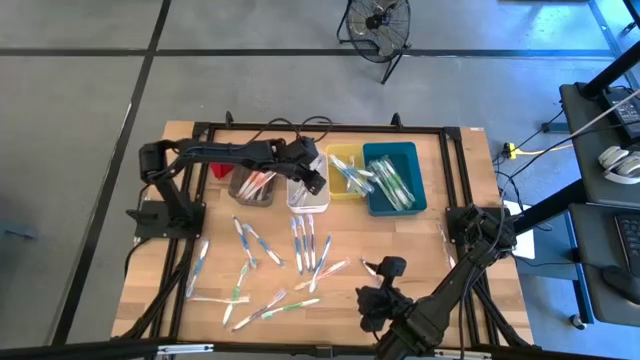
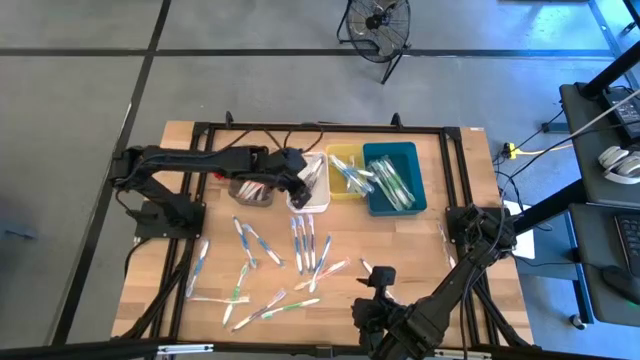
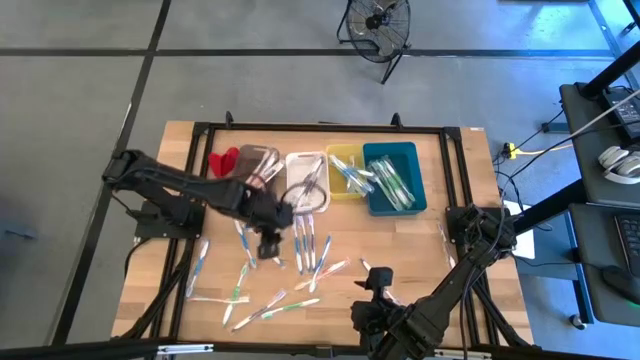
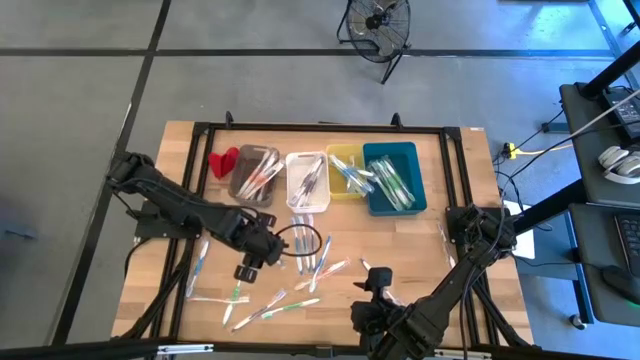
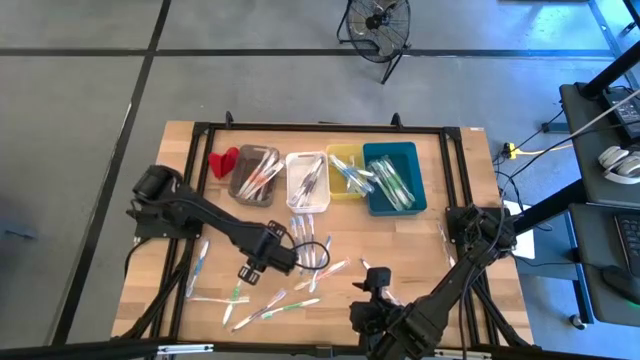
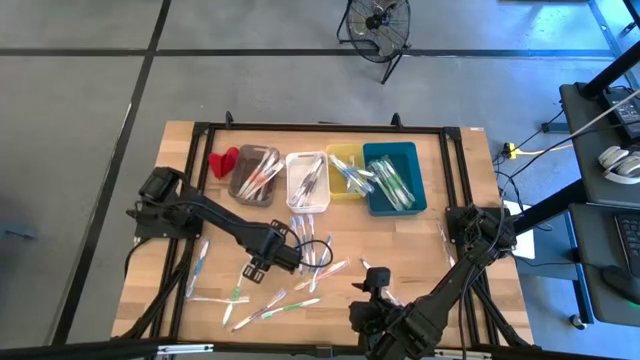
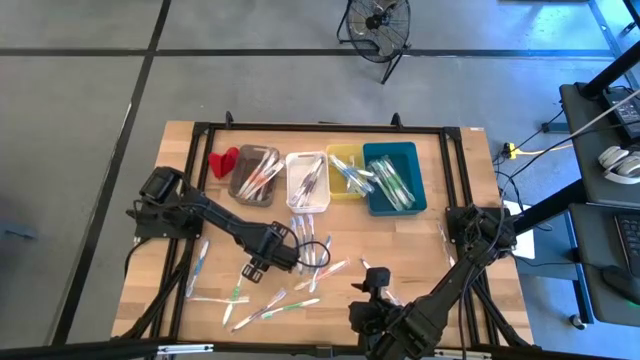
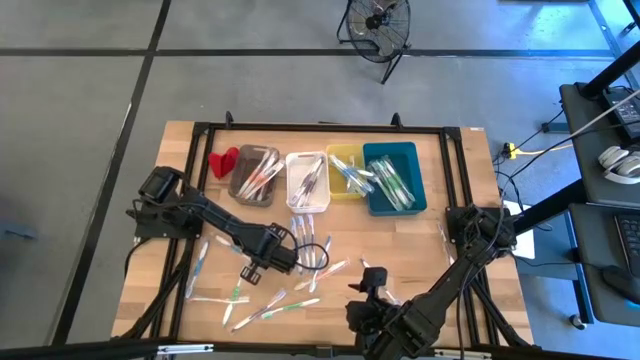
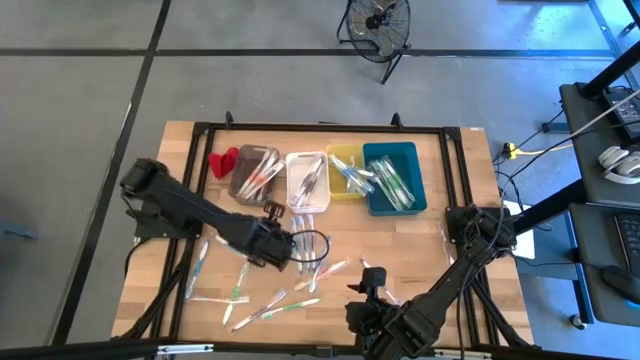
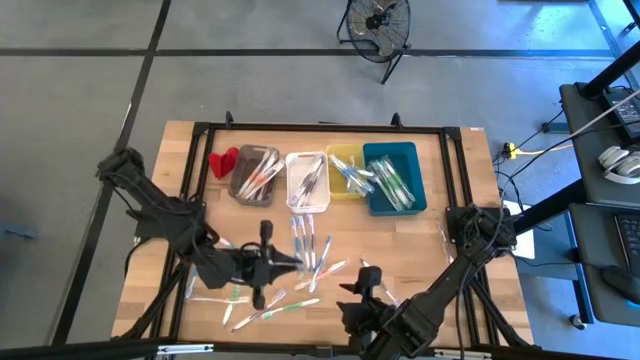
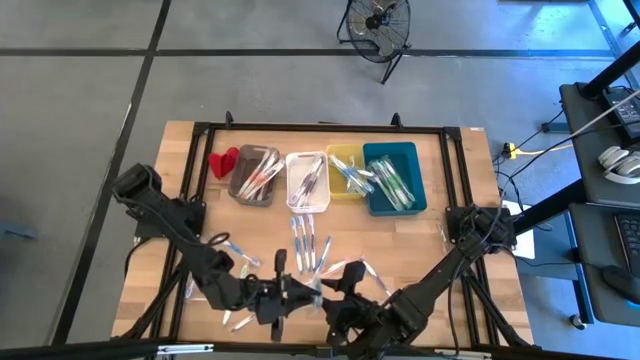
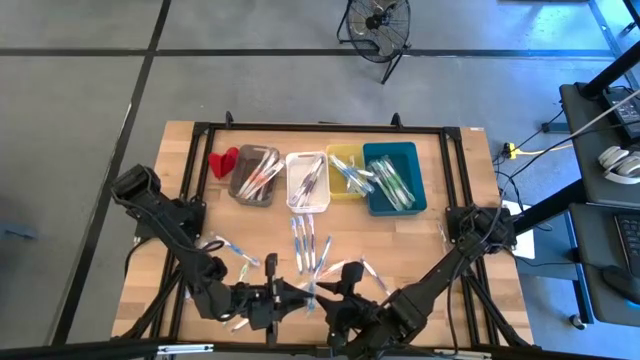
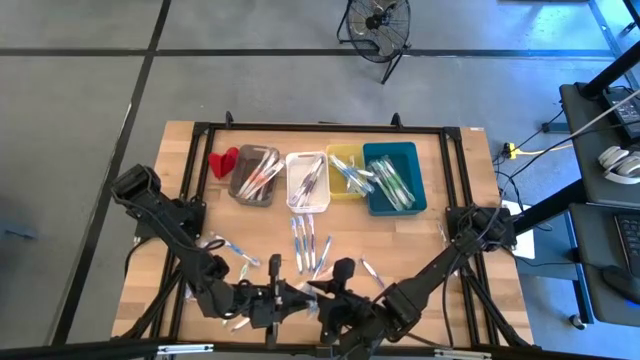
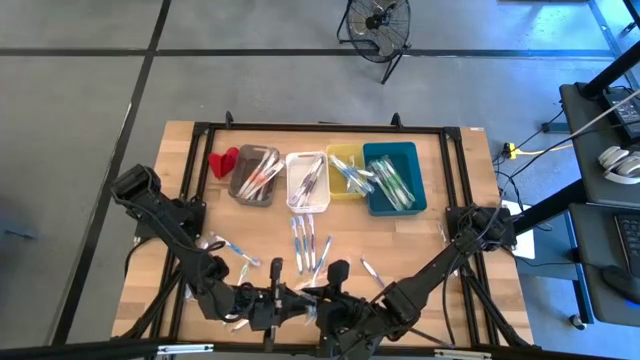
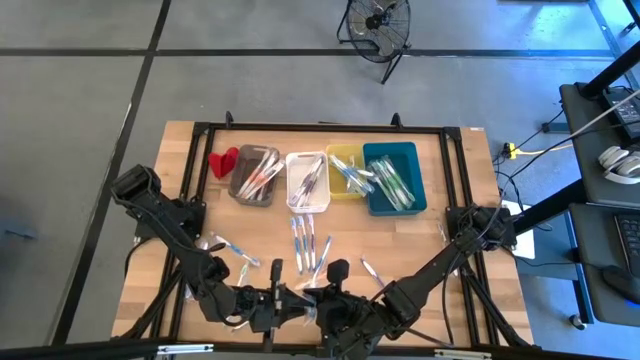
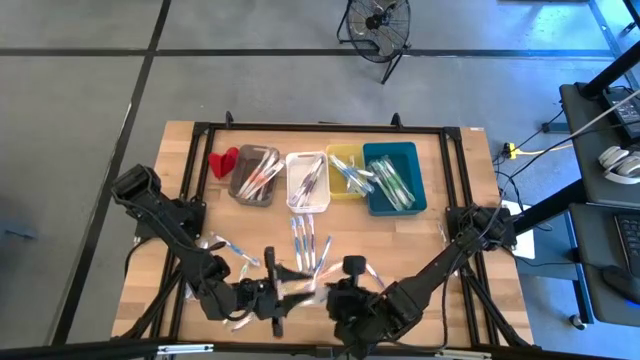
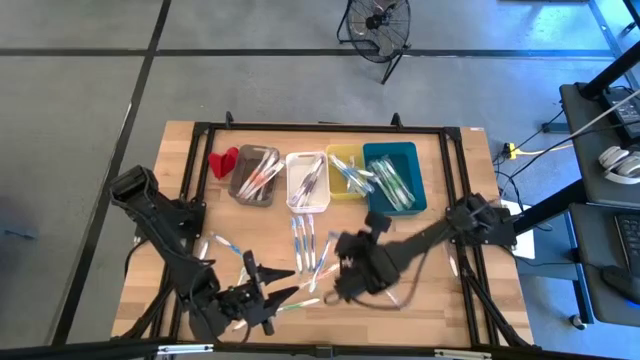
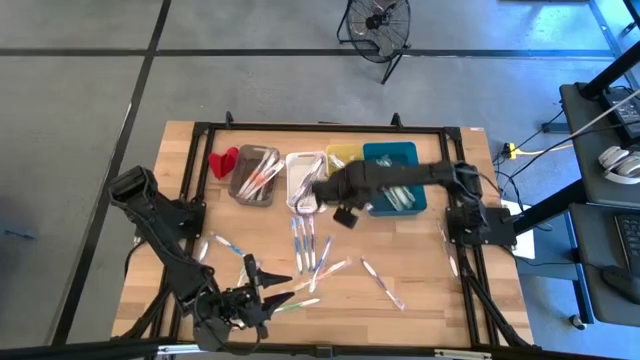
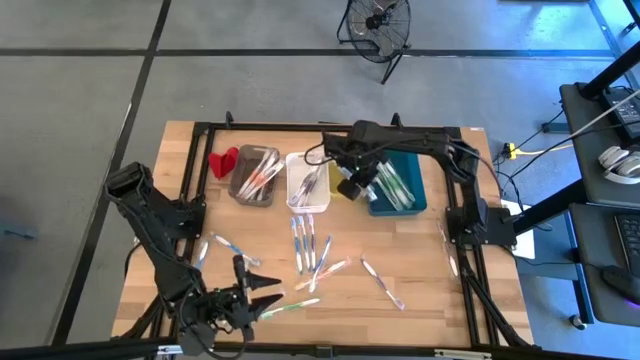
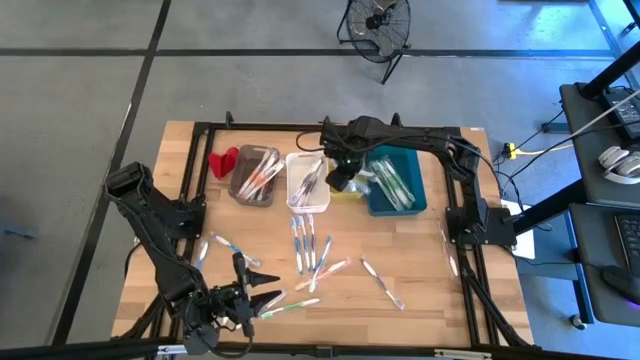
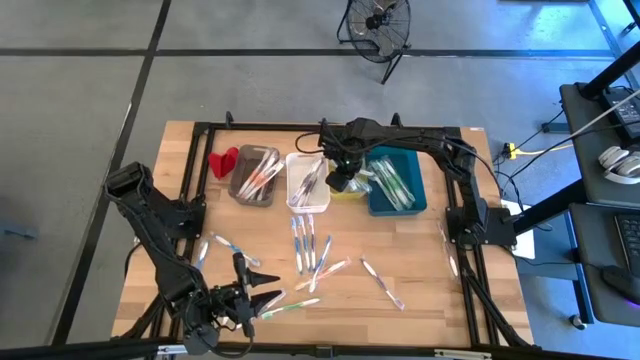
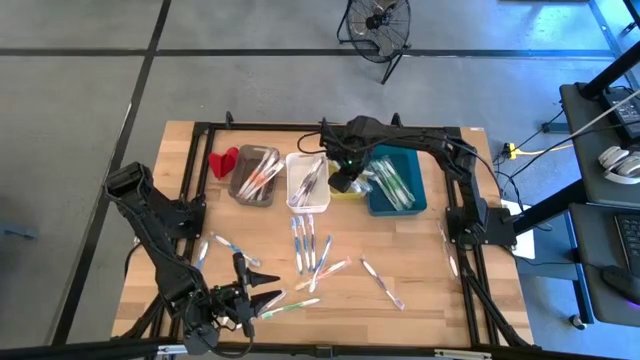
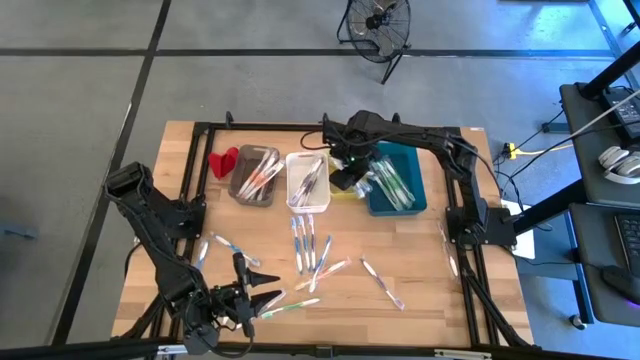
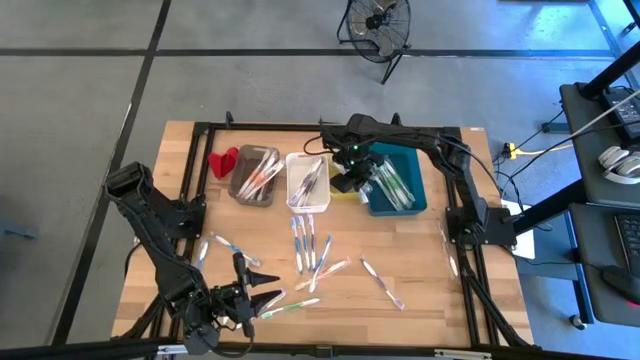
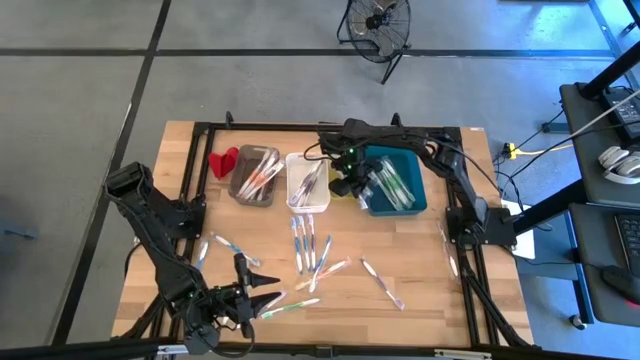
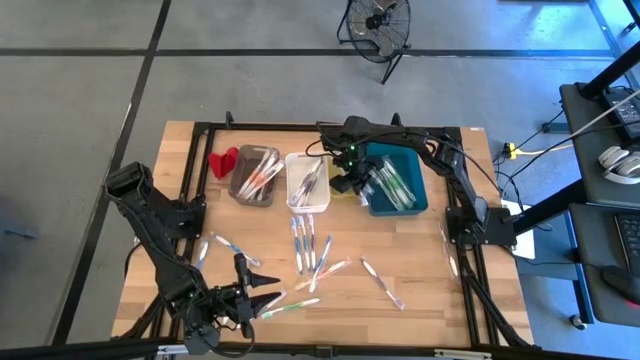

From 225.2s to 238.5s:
Task: Pick & Place Toothbrushes
Put the blue toothbrush into the yellow bin

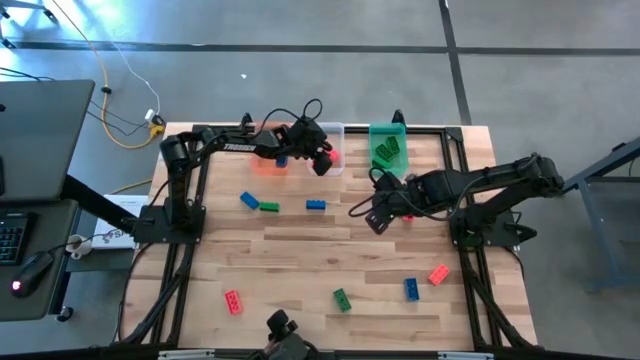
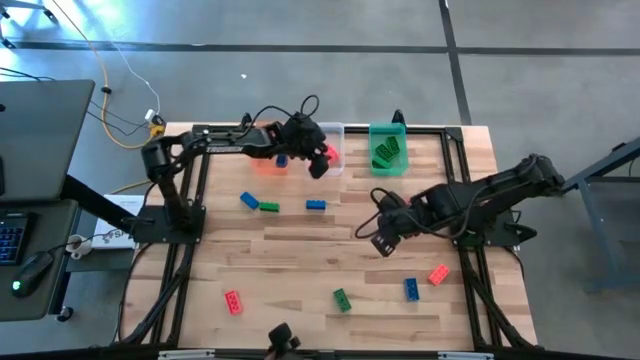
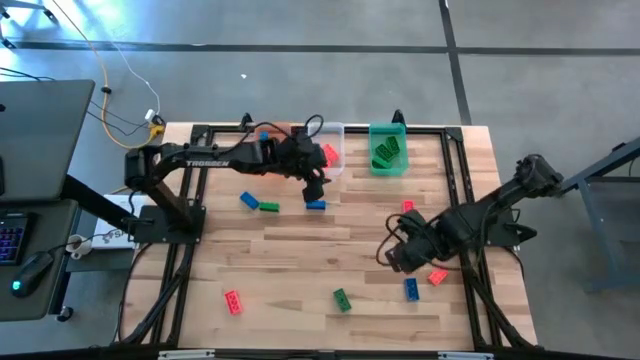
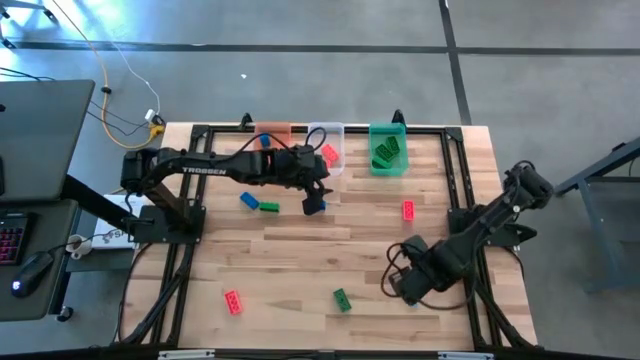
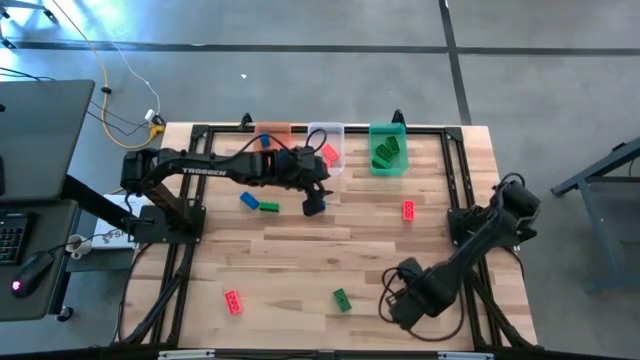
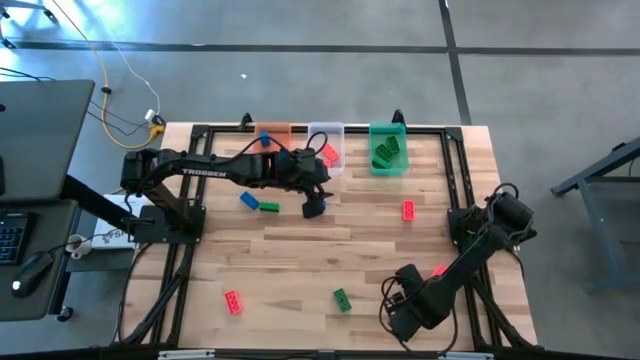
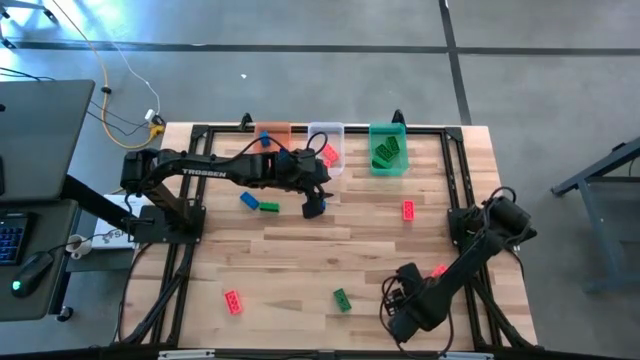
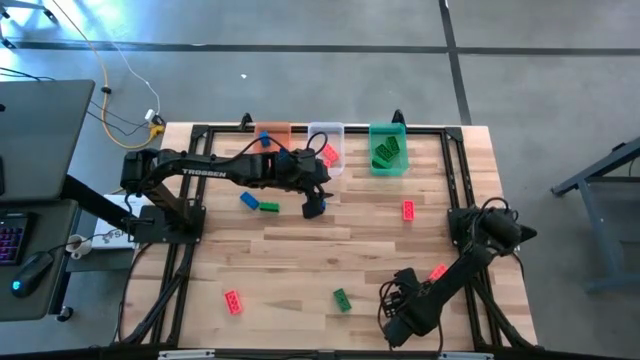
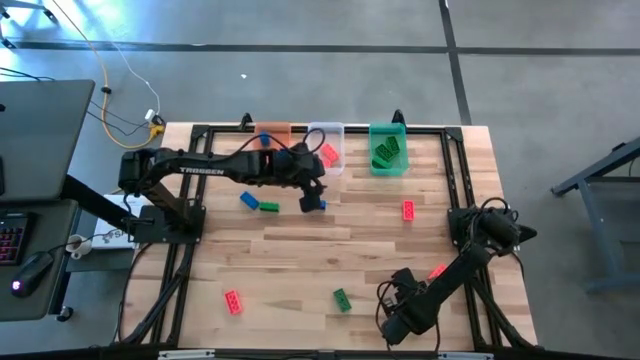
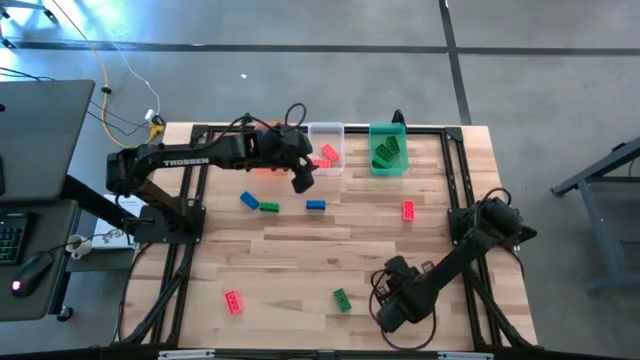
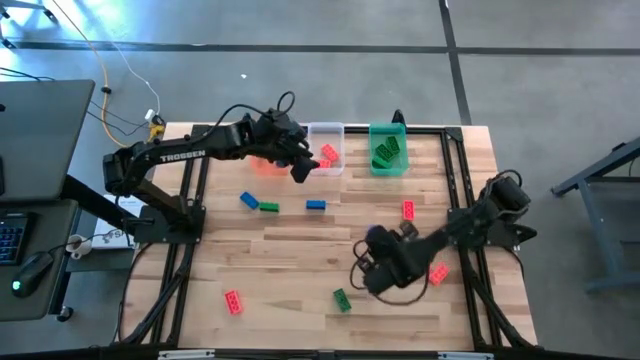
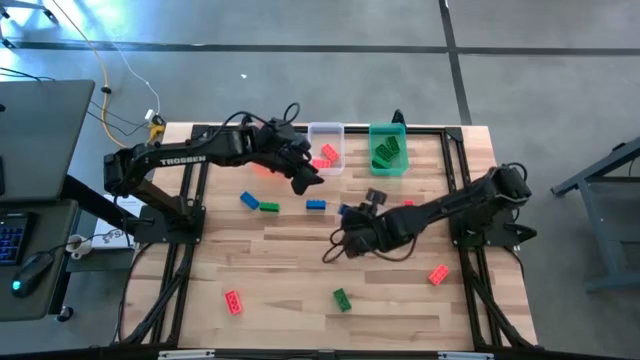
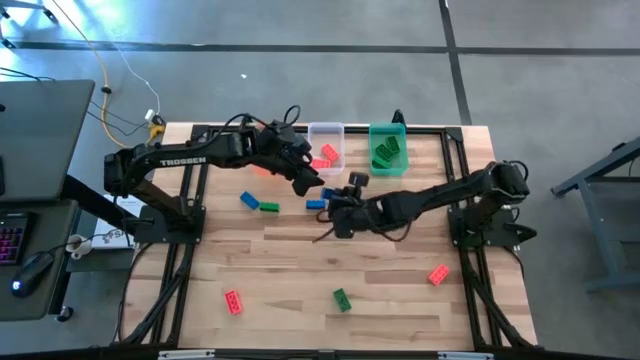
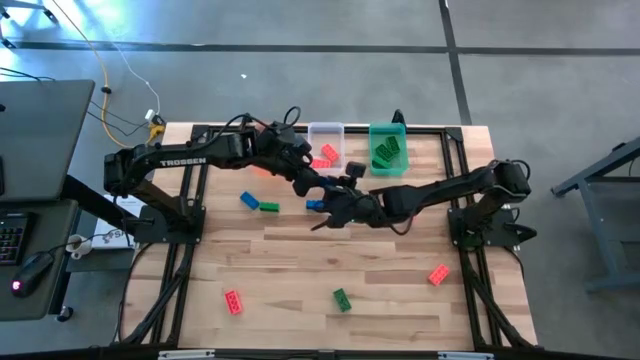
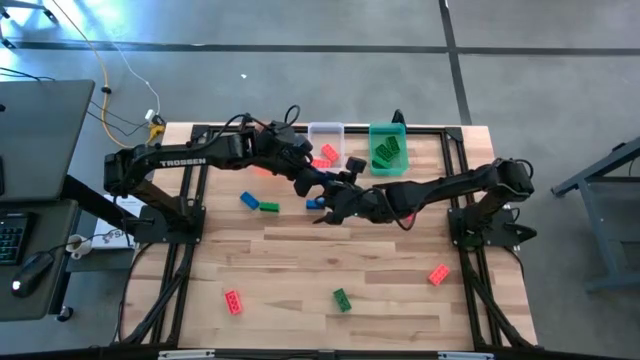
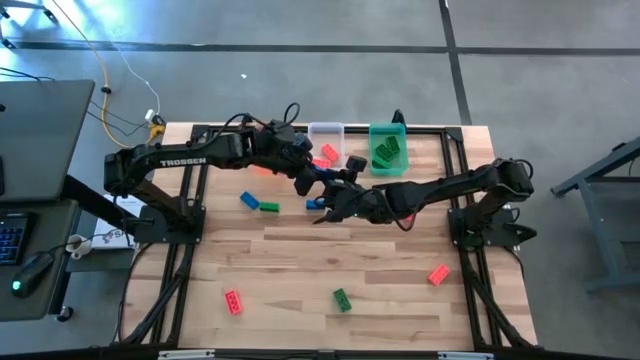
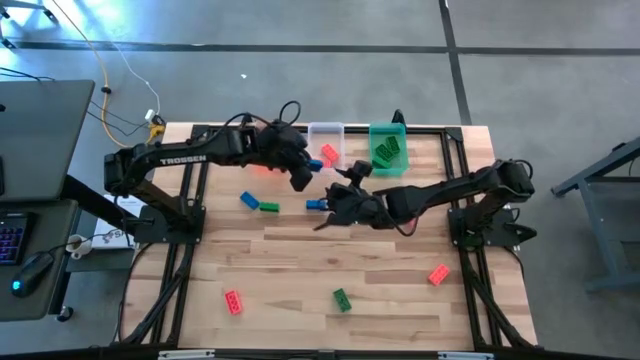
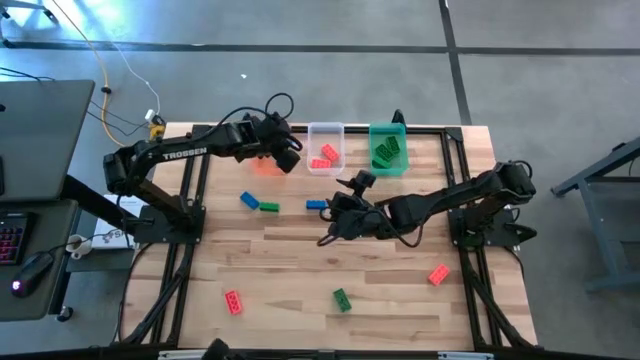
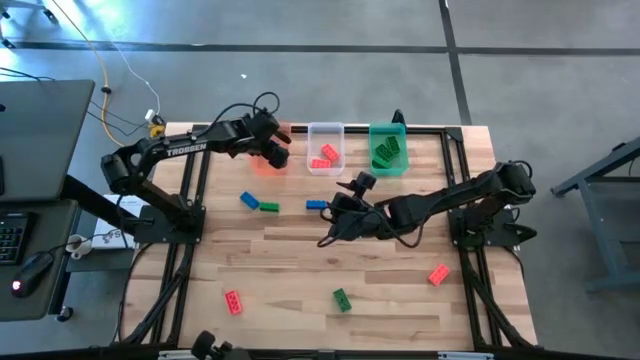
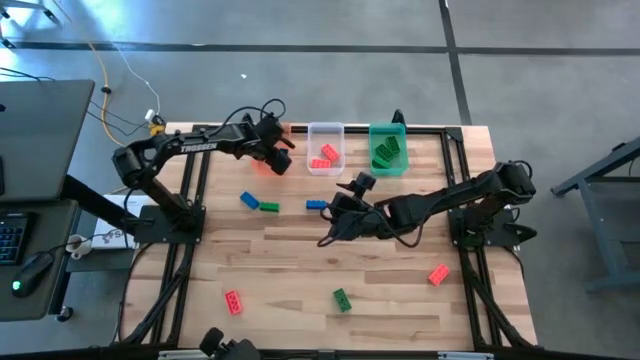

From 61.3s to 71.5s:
Task: Sort & place blocks by color
Put the blue game piece into the orange bin
